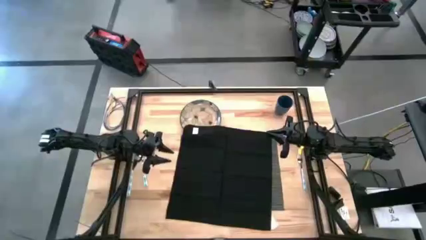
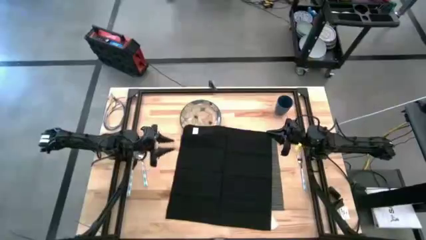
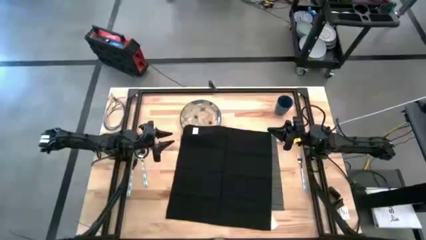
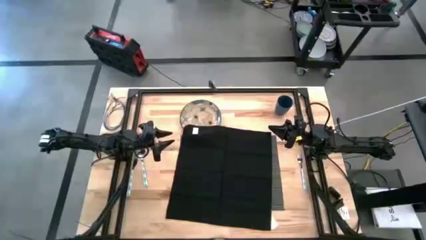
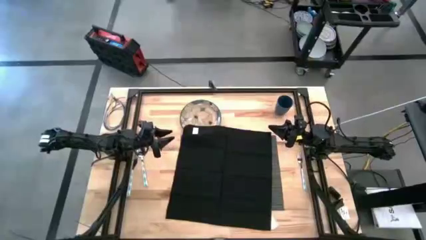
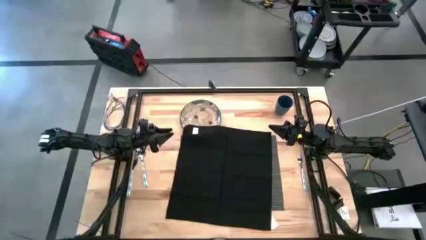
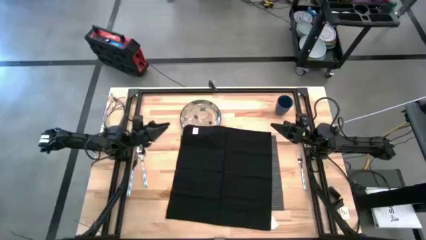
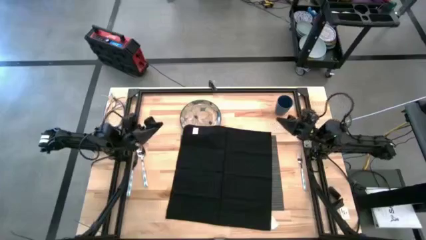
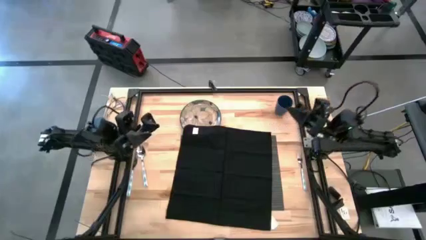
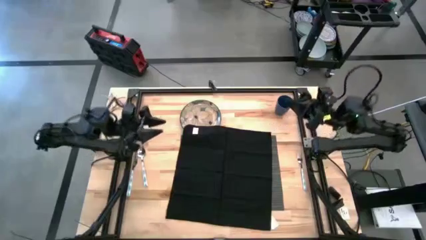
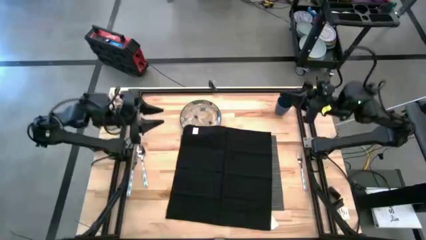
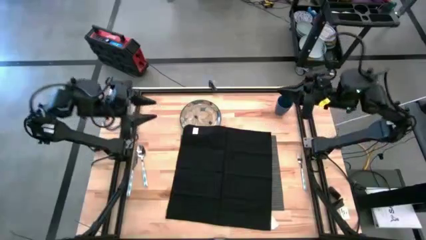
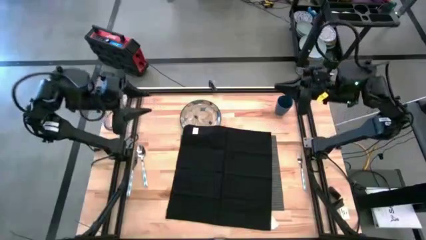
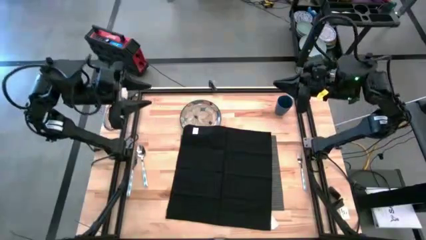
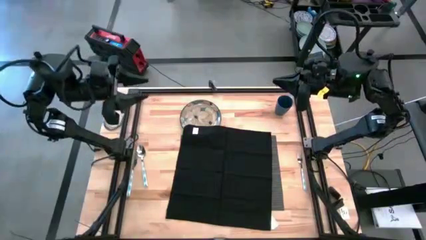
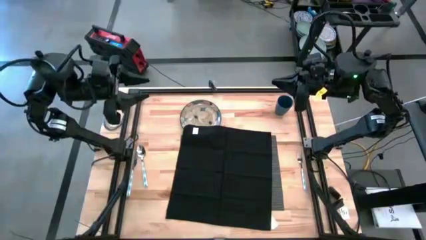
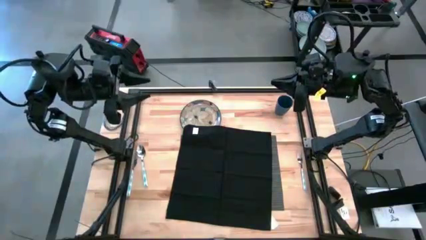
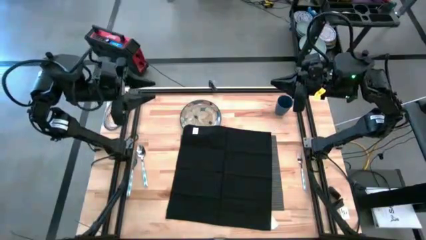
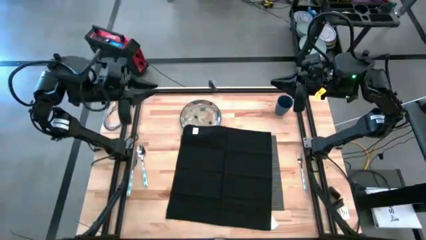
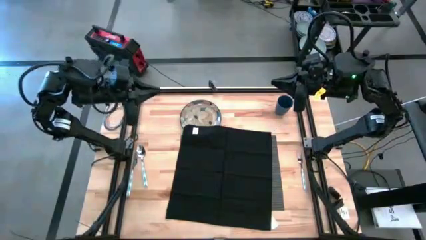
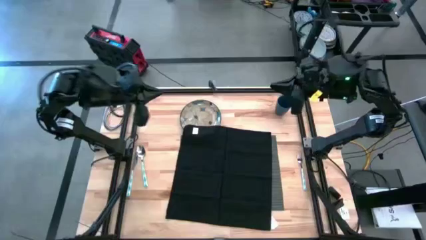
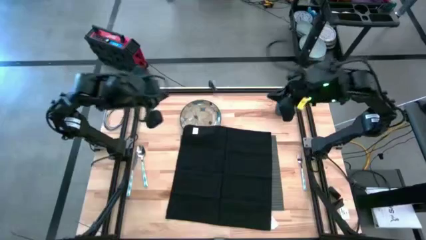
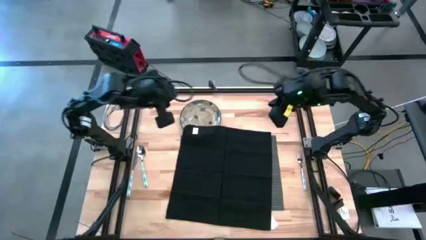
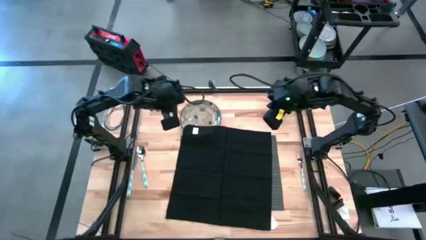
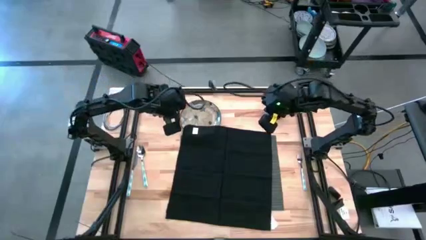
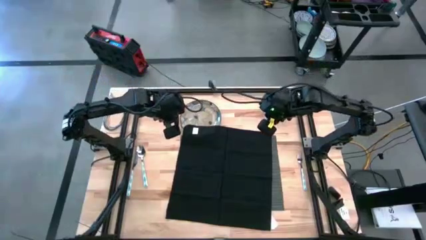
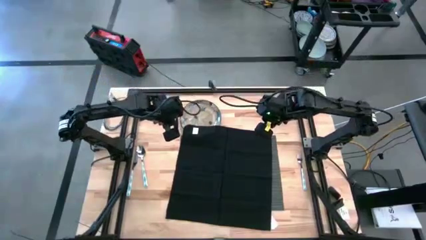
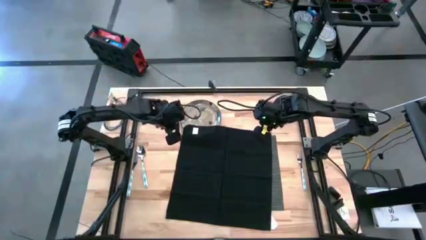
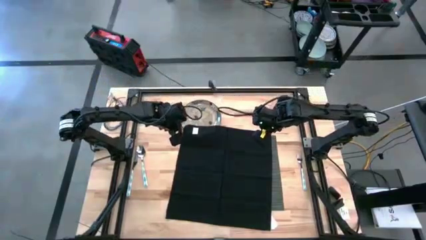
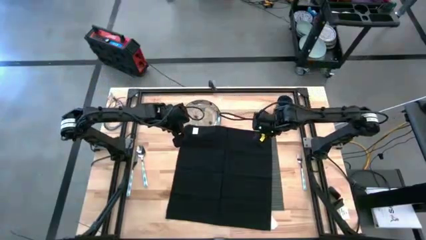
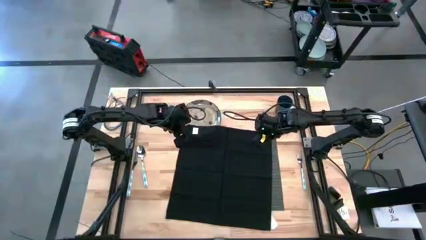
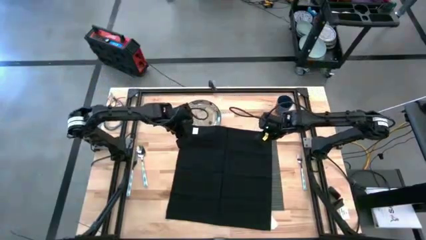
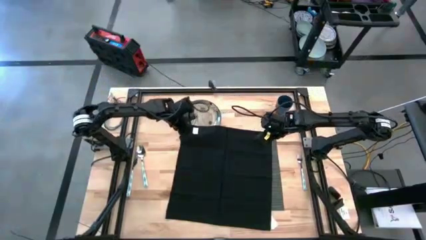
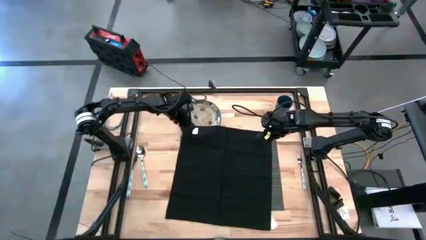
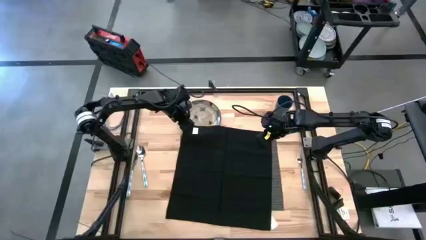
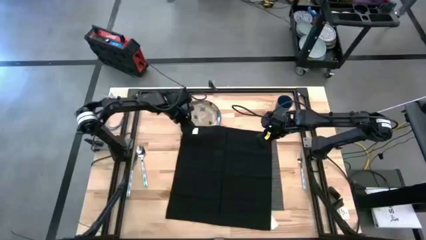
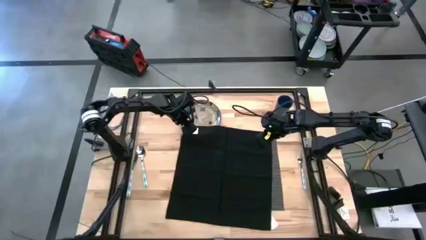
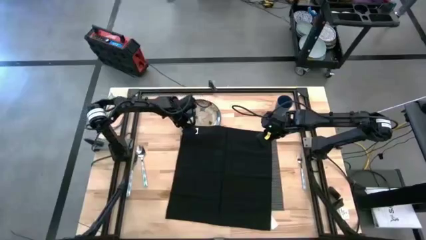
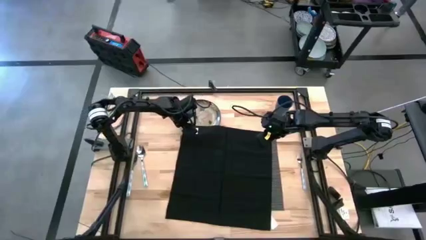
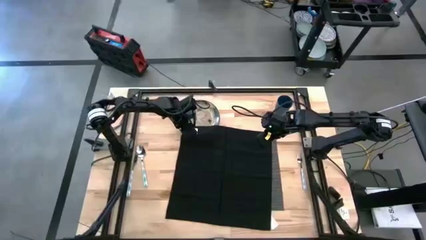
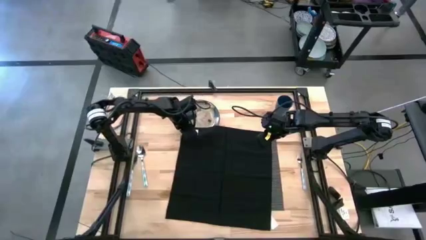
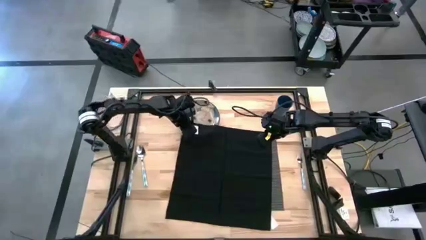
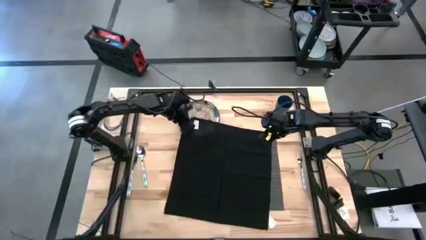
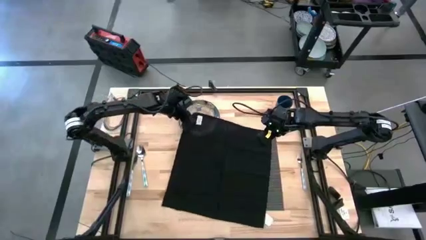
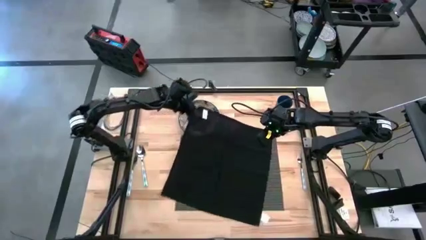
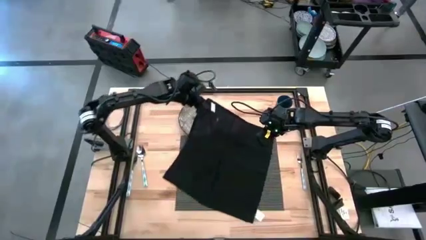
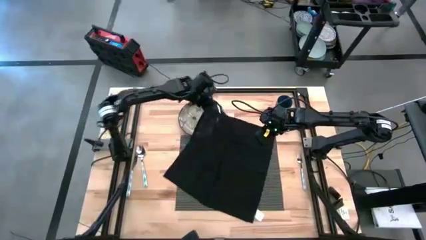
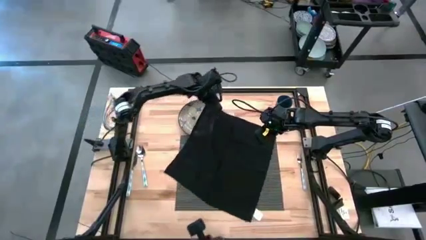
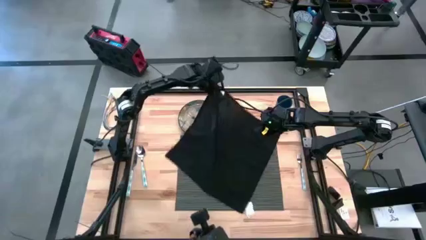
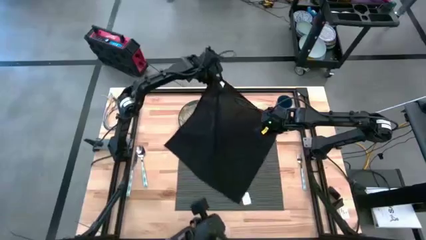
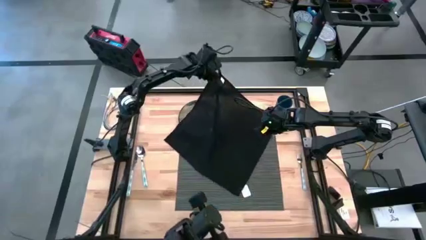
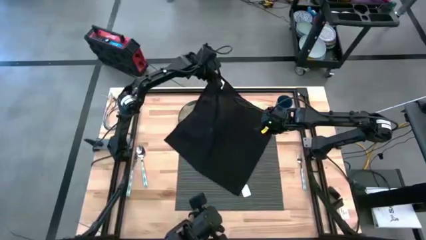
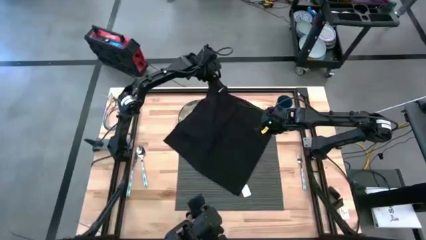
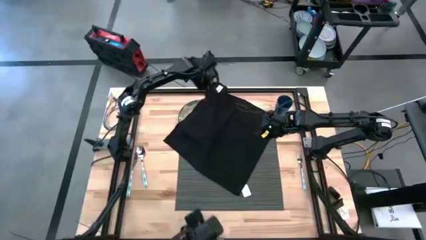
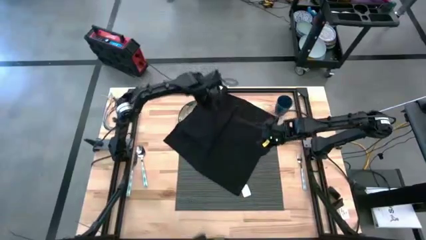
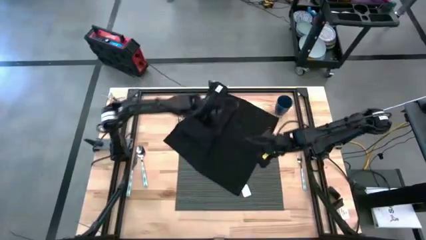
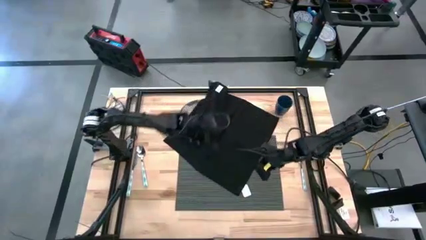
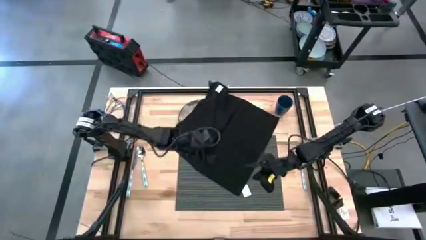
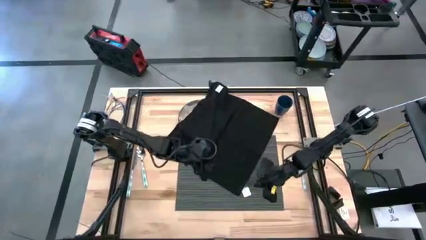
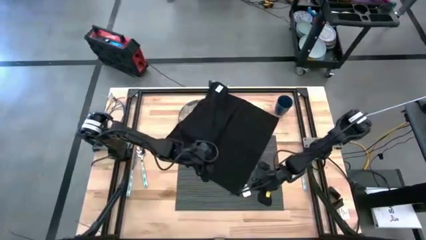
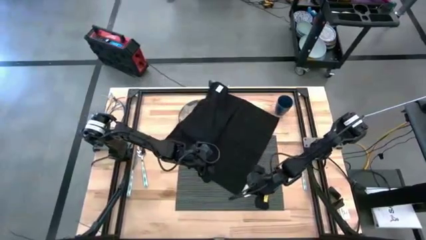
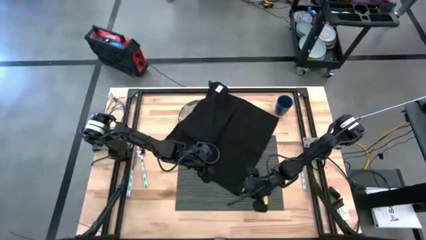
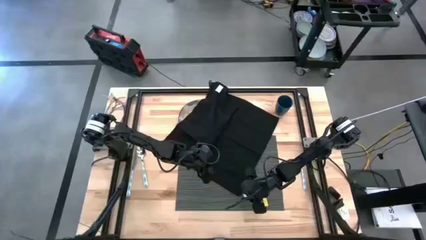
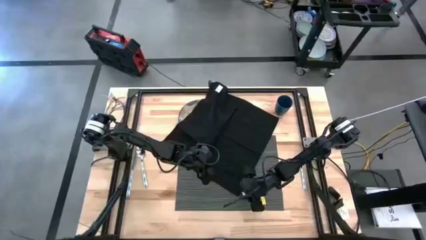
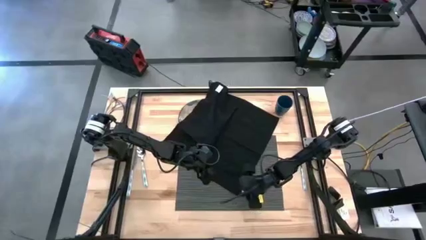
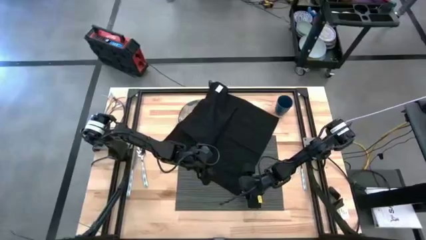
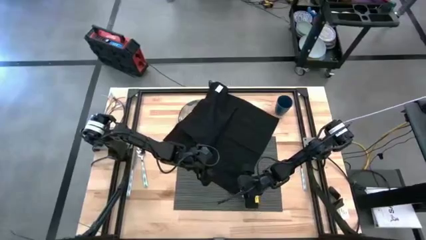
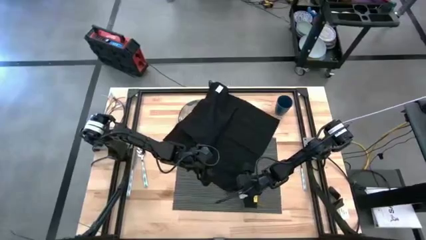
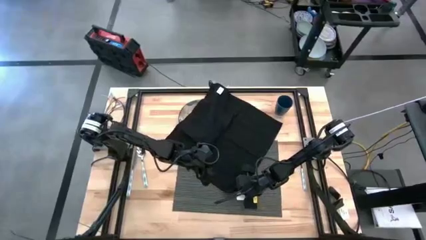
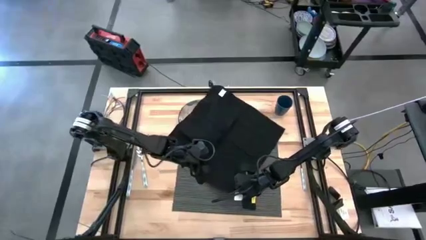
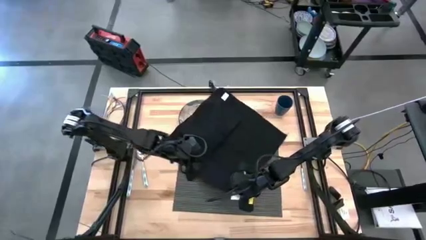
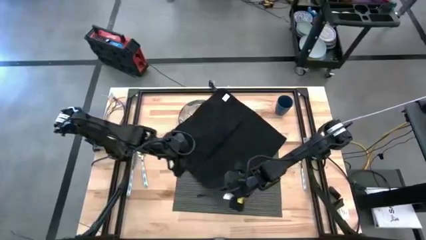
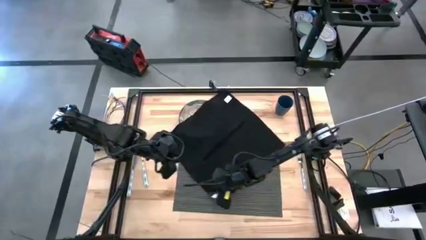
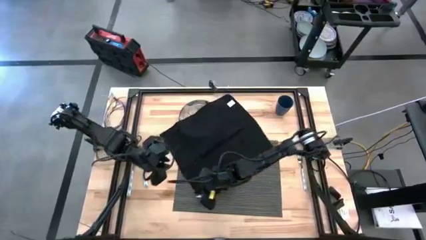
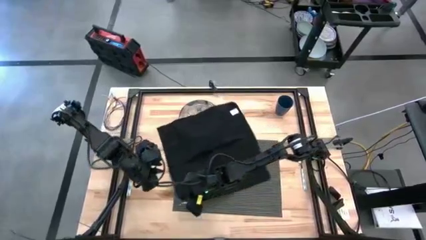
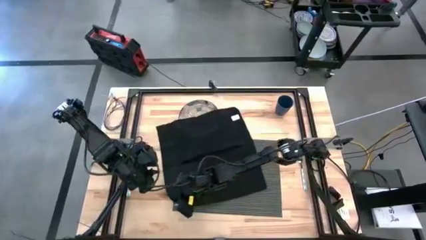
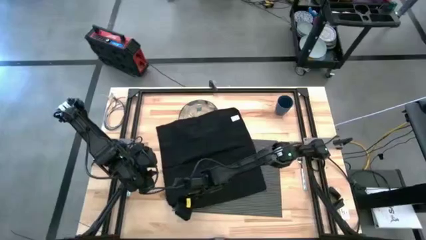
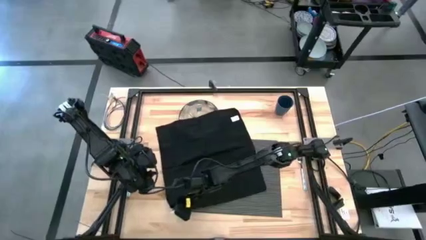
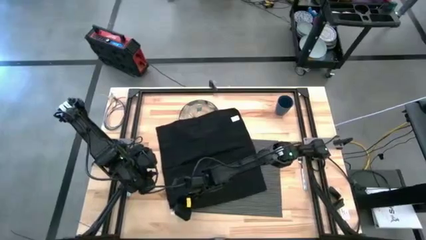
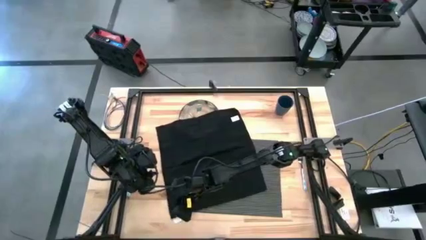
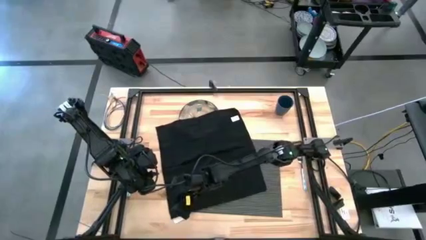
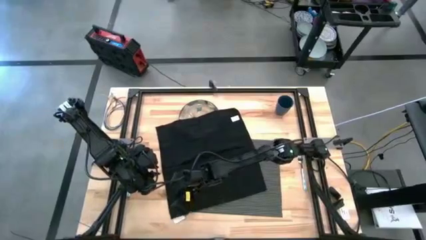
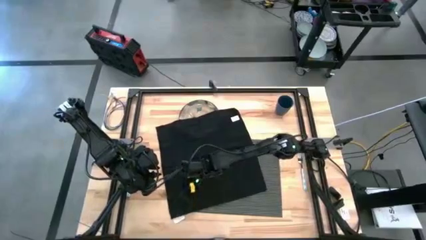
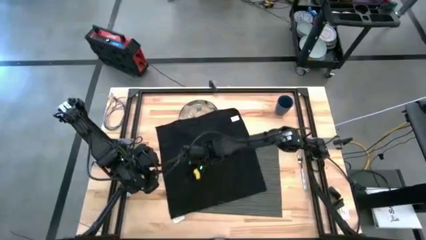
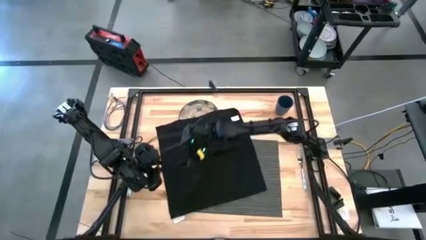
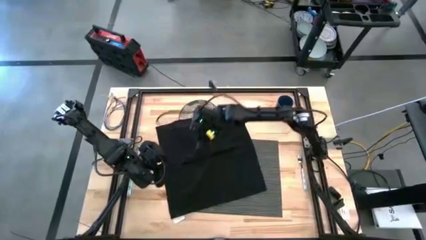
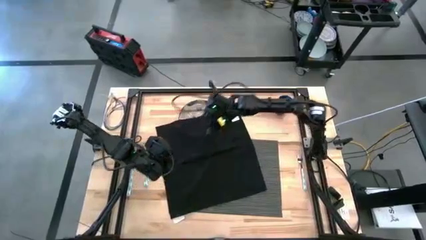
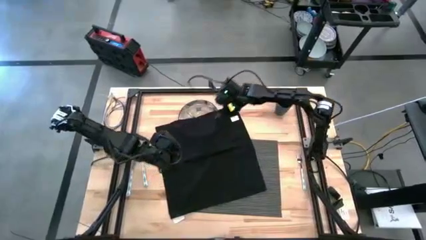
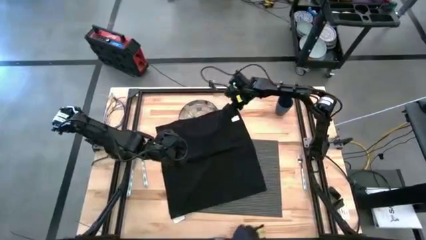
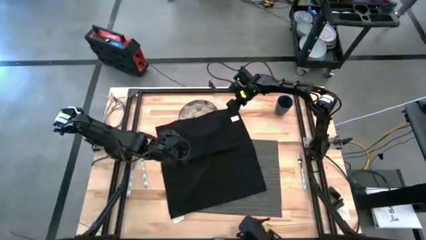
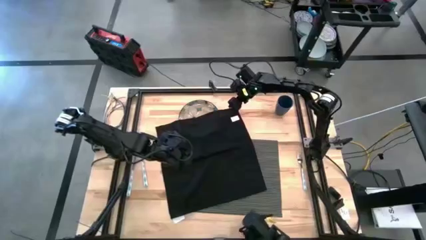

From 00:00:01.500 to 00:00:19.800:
Task: Set table place
Fold the black napkin

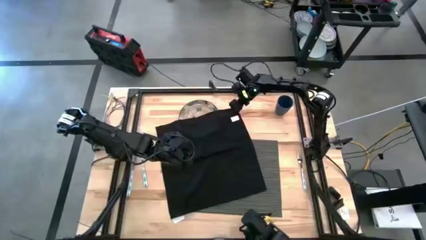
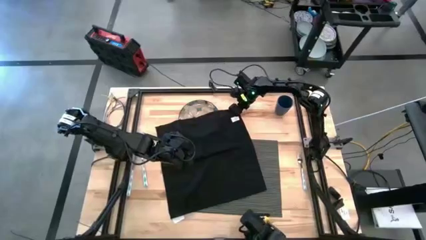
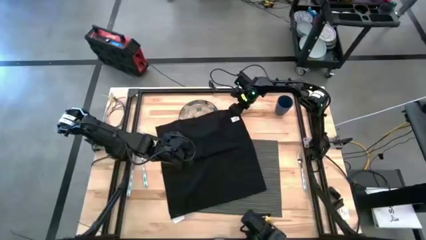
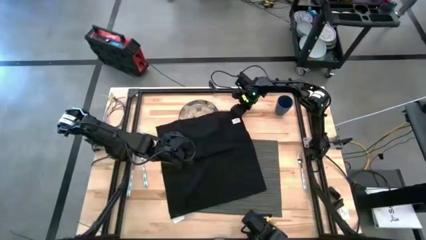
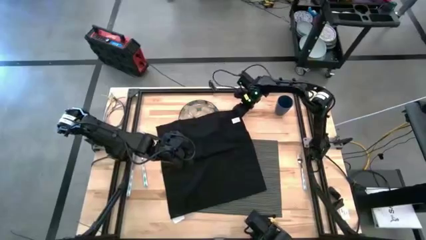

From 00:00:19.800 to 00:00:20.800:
Fold the black napkin
